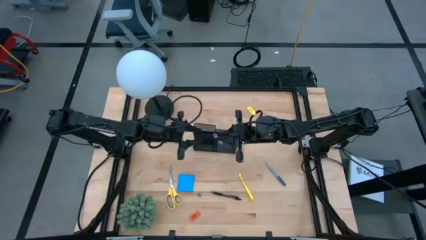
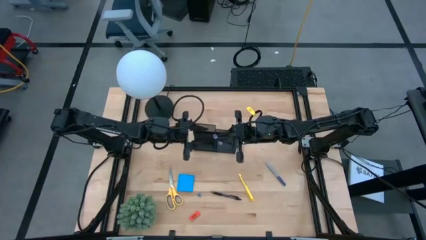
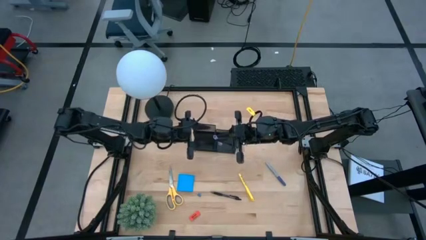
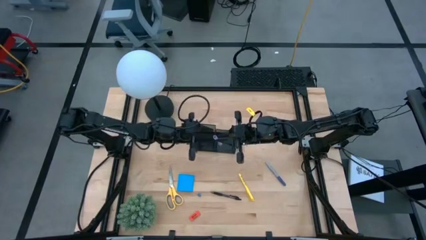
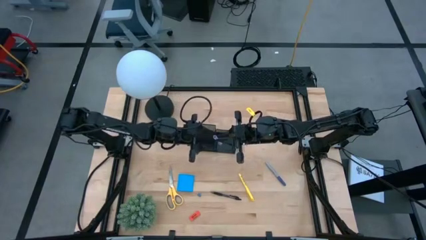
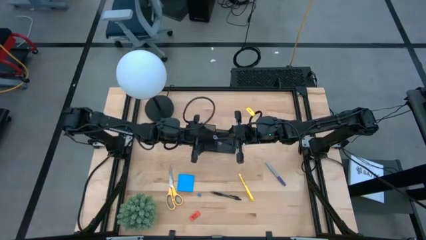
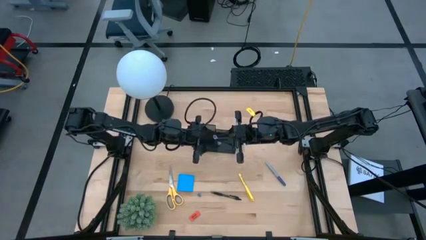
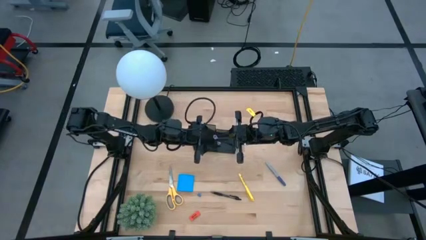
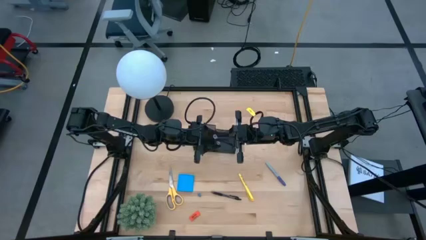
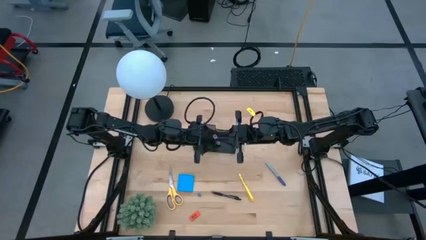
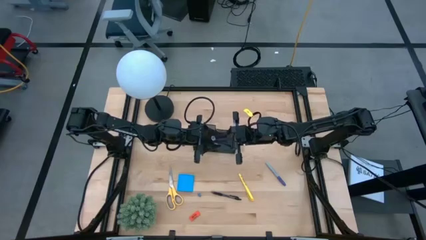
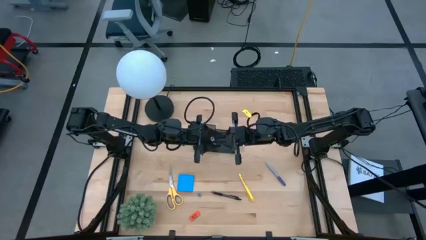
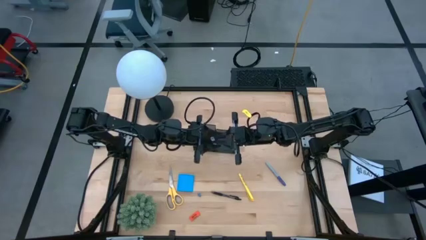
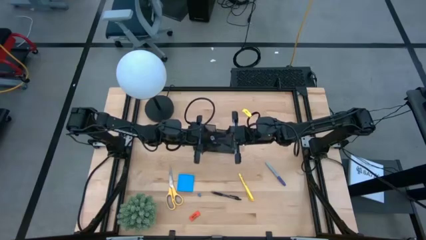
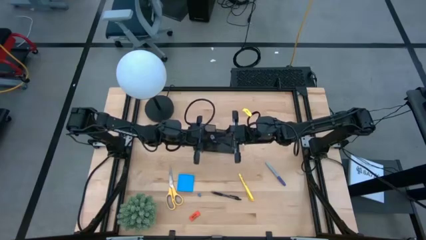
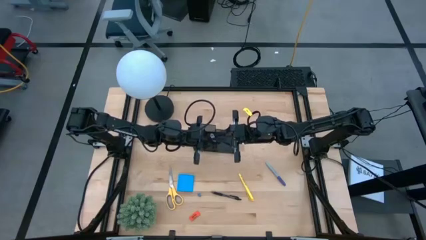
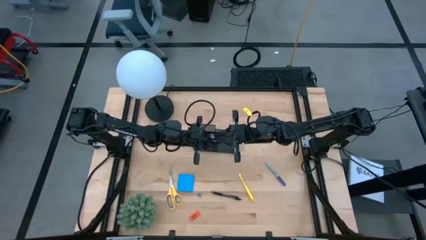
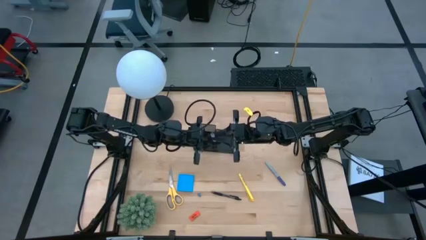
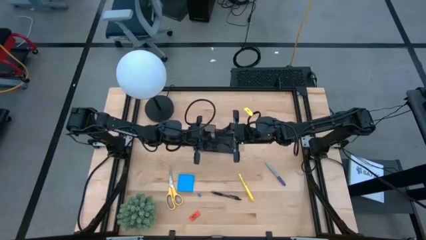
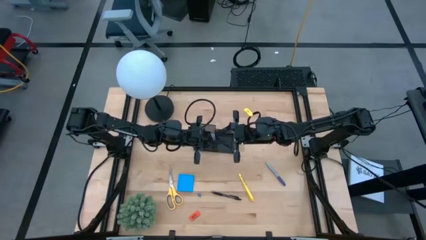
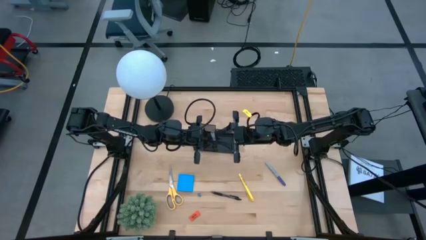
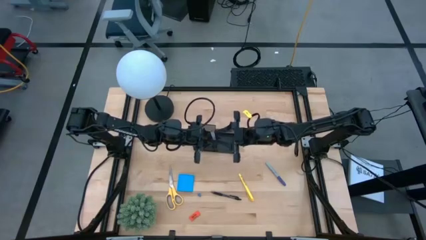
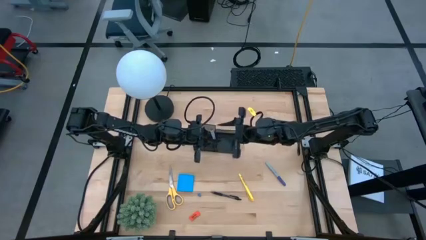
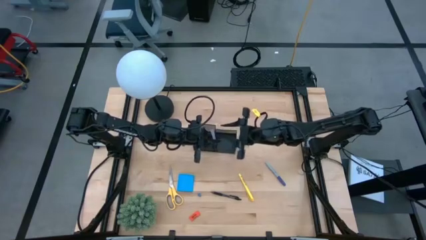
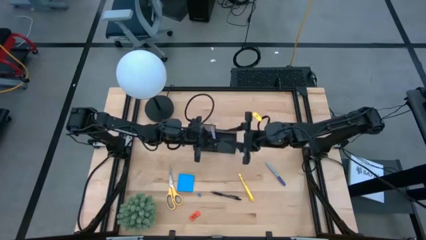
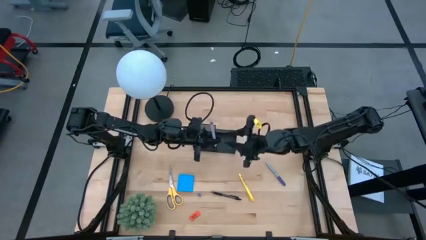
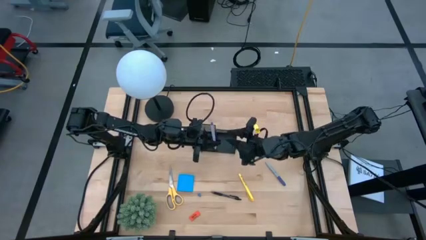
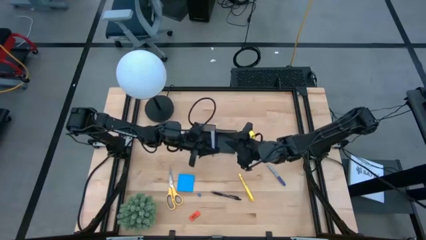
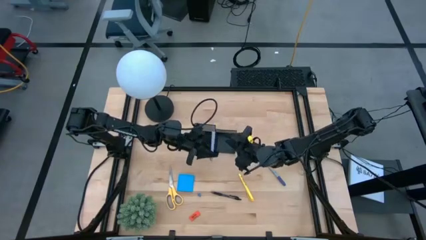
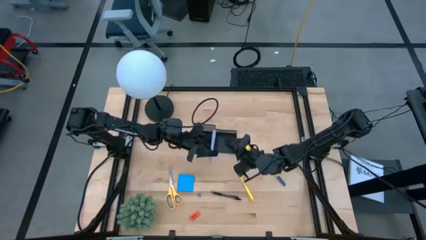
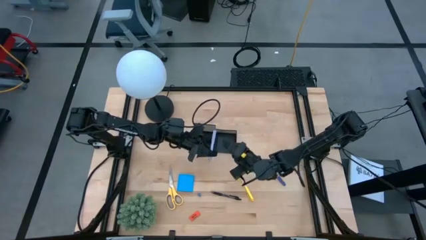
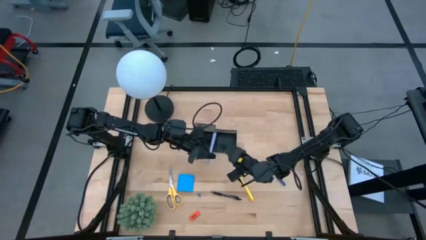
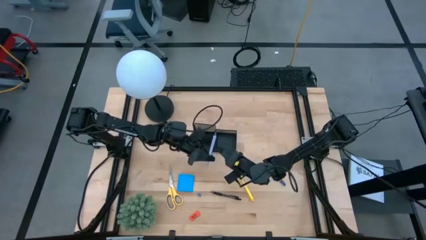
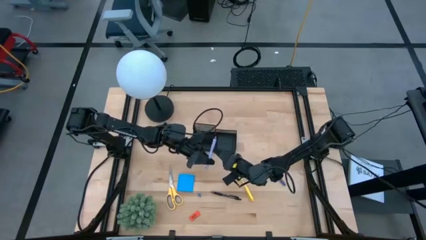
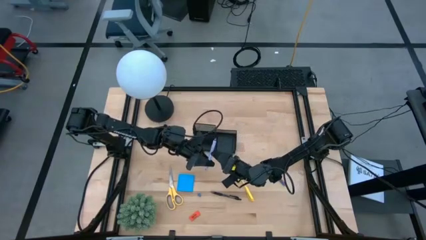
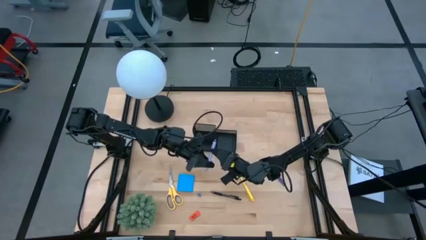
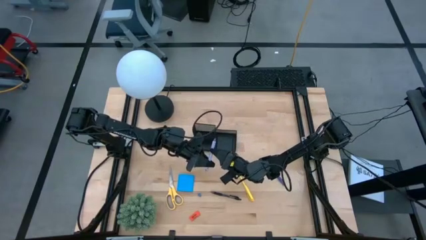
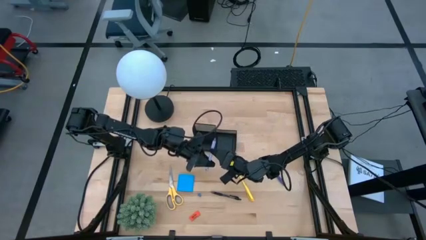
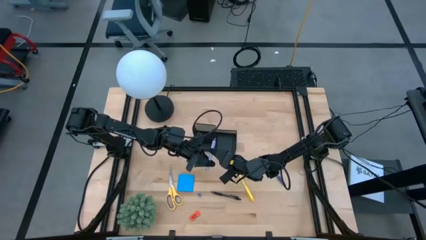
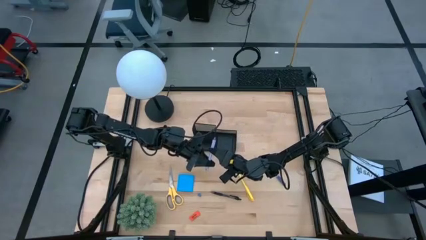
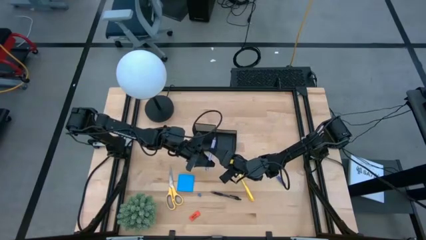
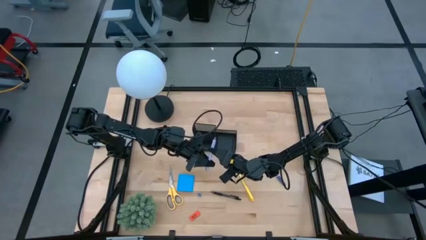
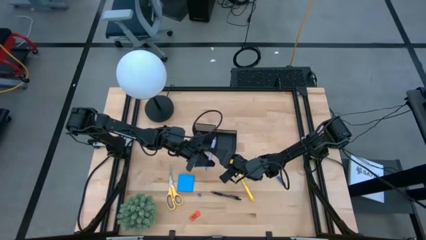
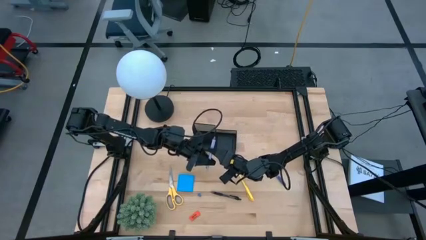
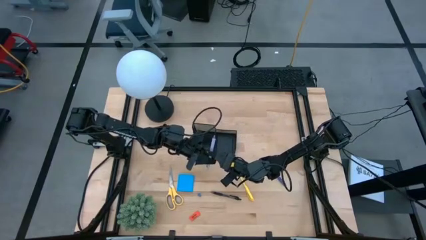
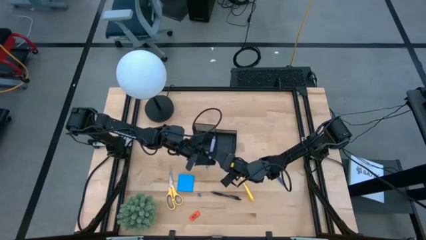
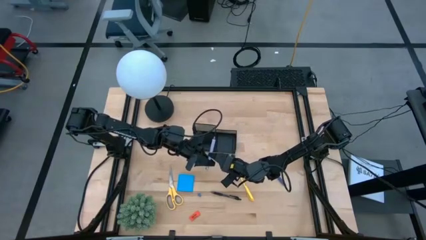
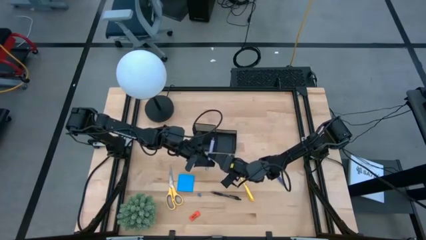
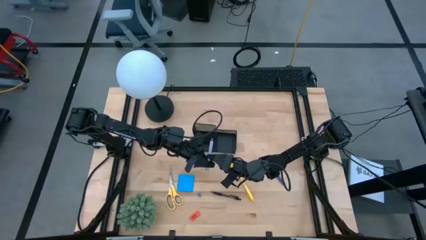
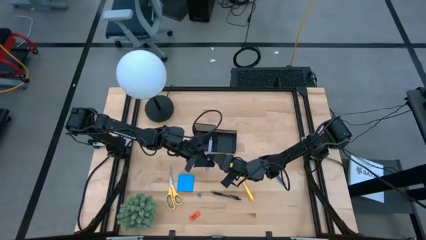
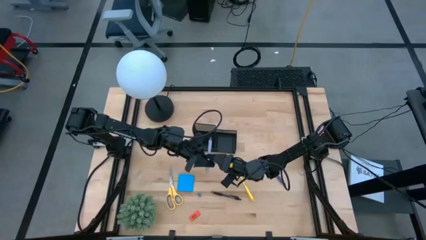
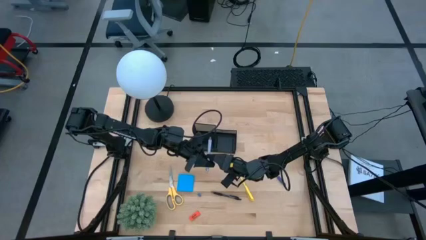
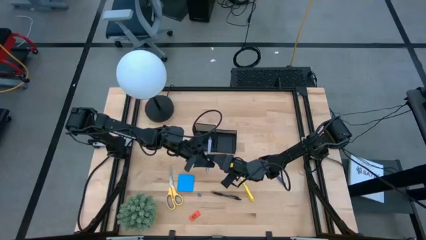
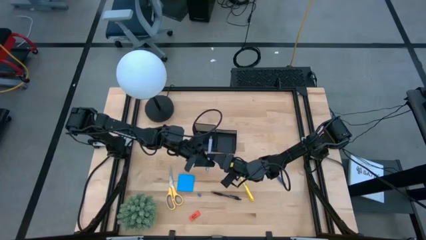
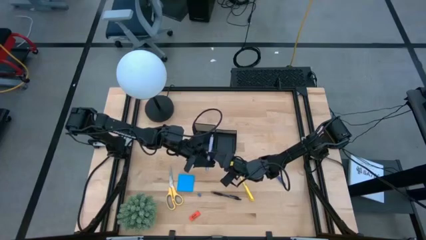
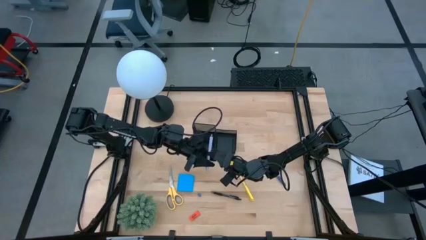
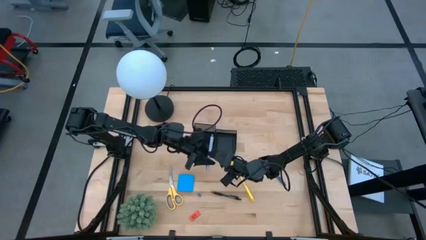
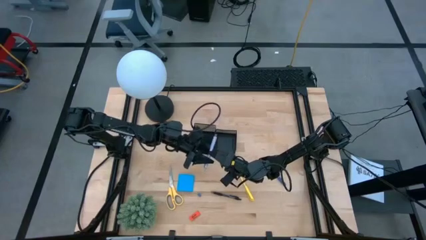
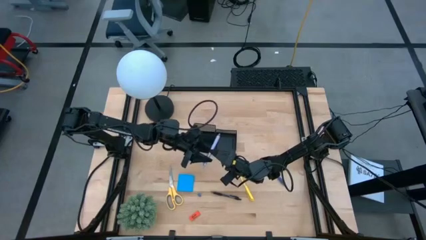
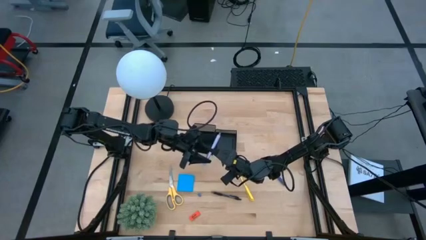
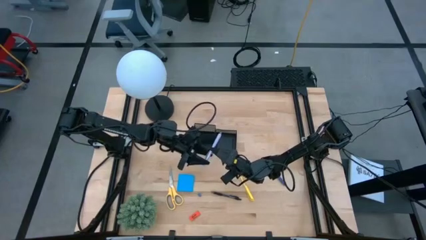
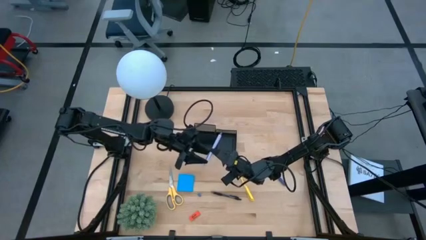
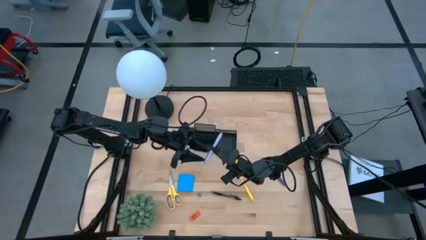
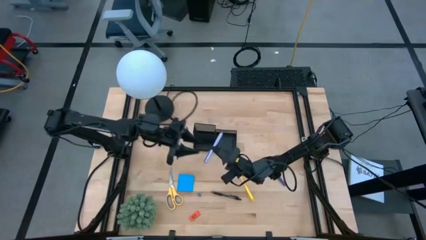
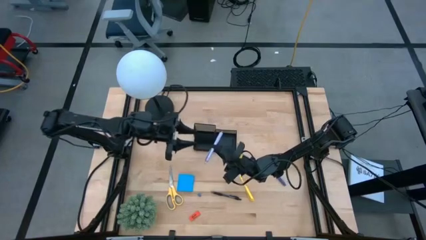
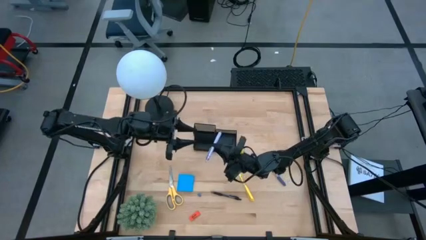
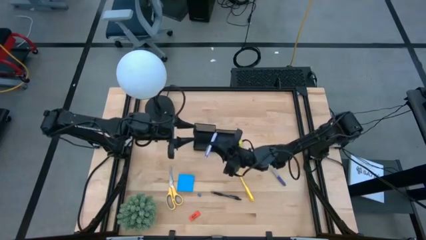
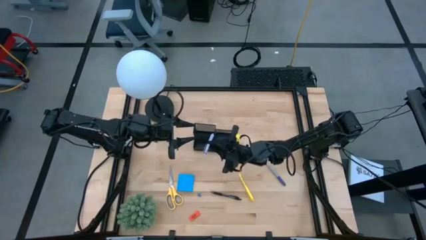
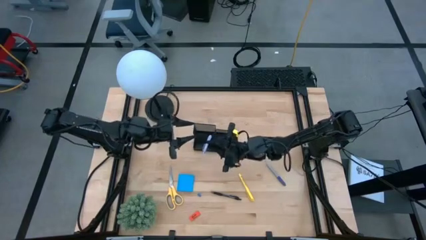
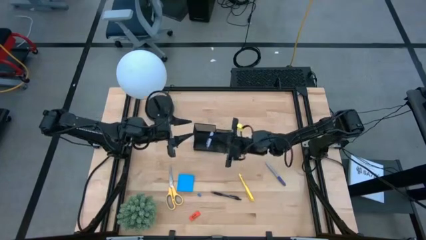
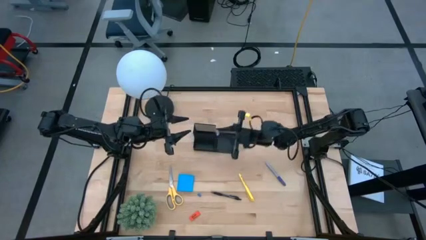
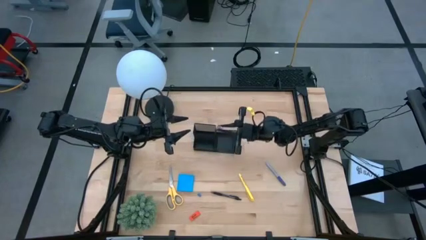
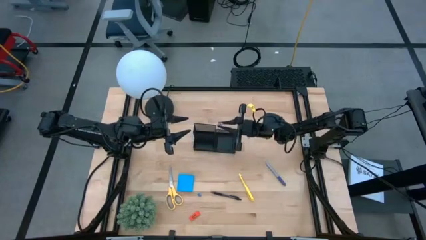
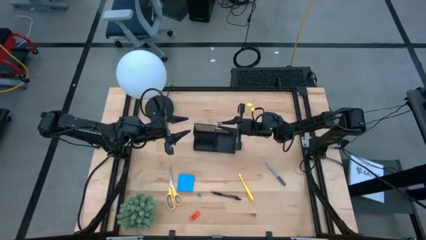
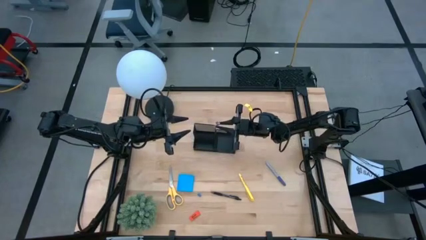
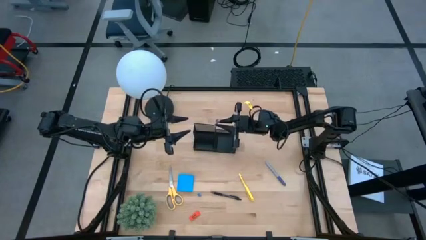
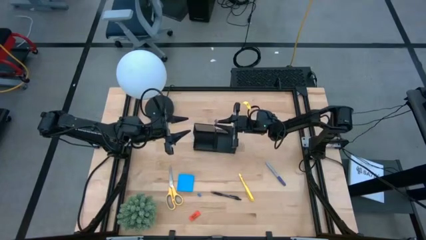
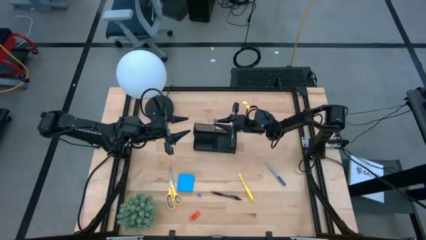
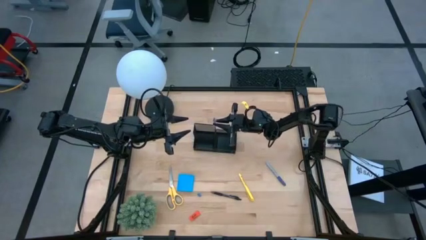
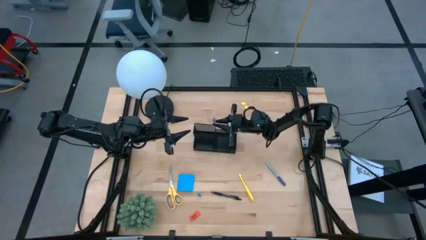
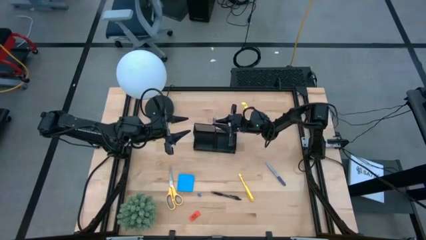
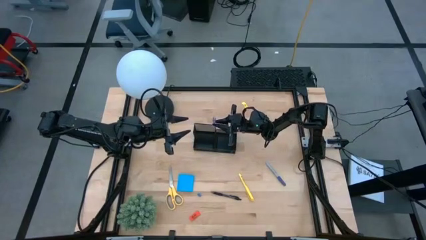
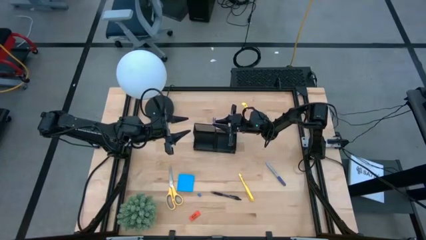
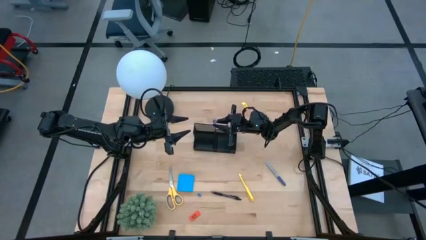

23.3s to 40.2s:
Task: Pick and place office supplies into organizer
Put the violet pen into the black desk organizer
